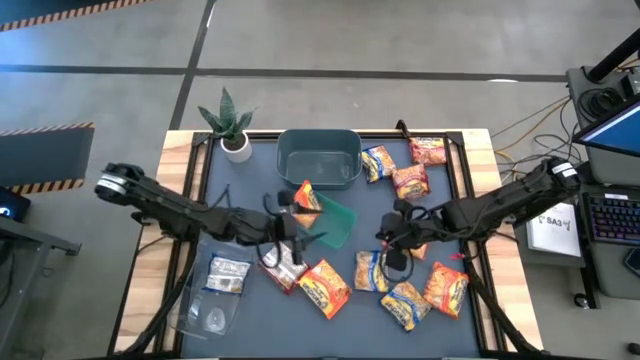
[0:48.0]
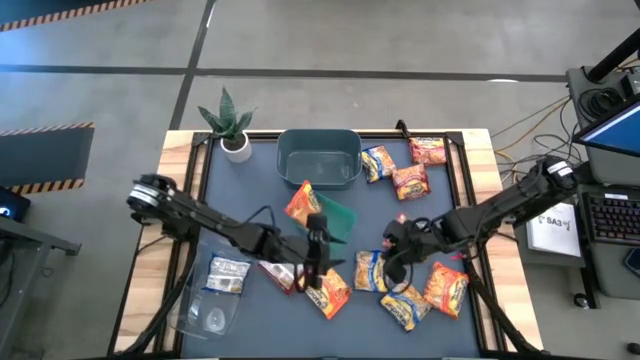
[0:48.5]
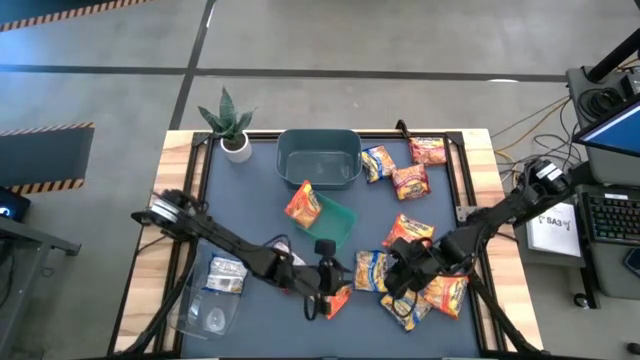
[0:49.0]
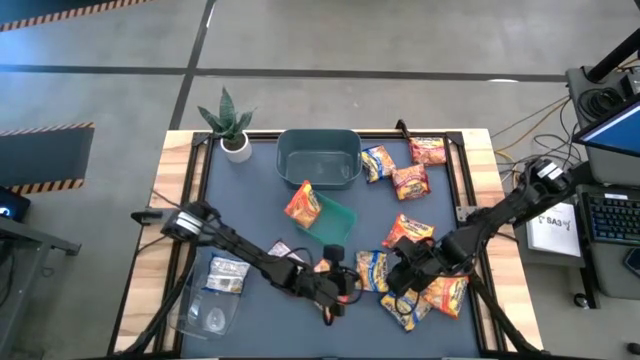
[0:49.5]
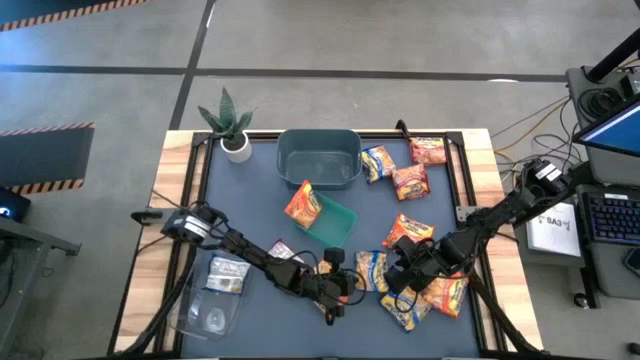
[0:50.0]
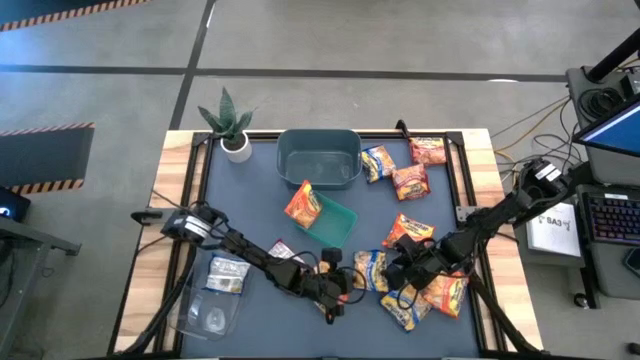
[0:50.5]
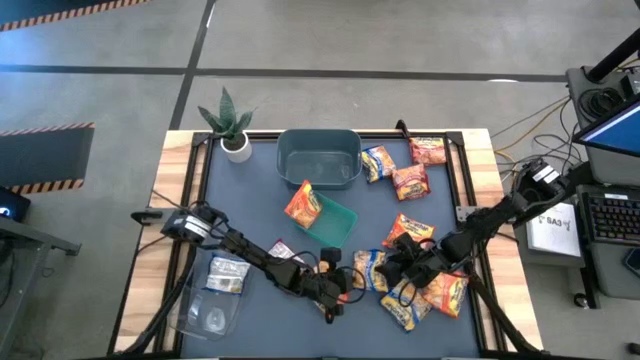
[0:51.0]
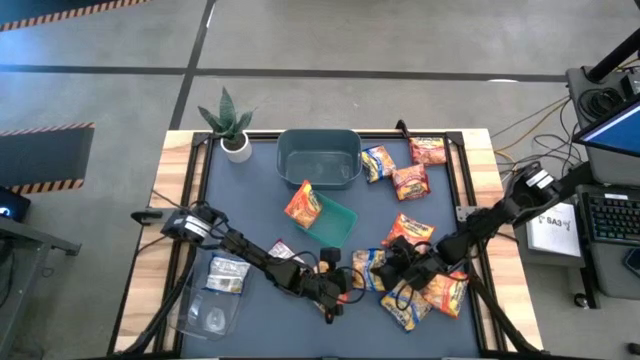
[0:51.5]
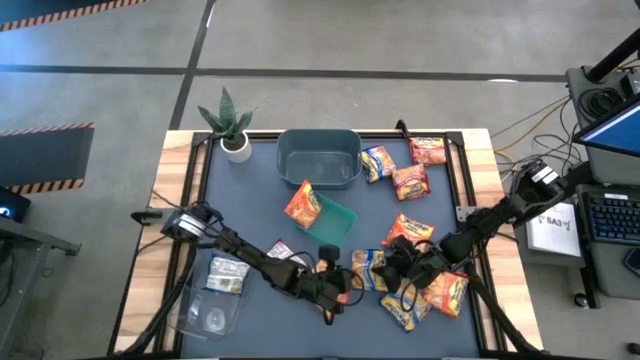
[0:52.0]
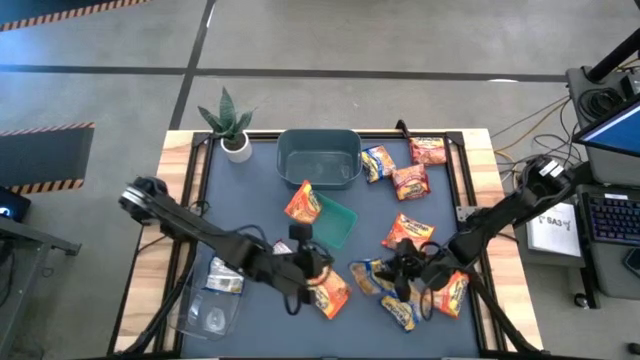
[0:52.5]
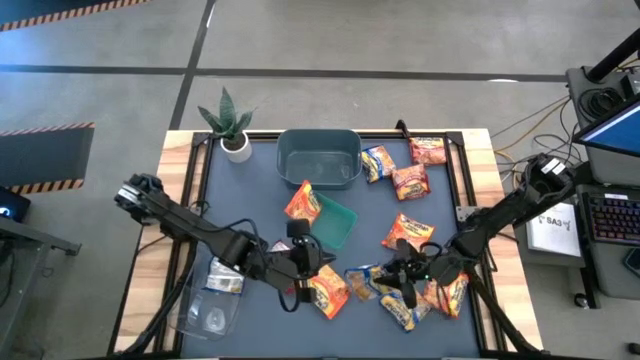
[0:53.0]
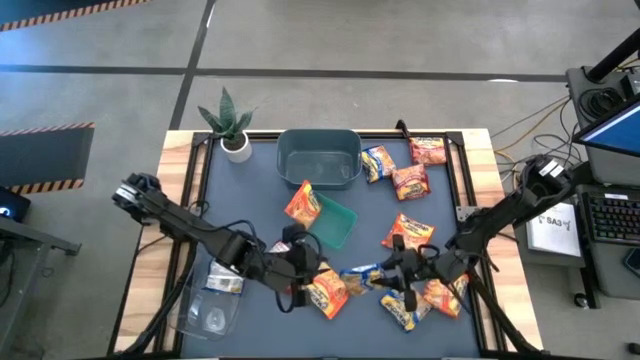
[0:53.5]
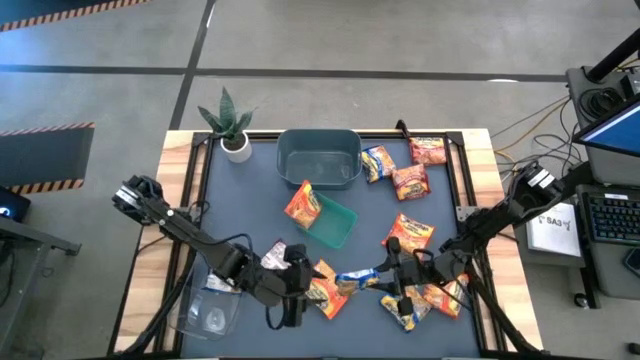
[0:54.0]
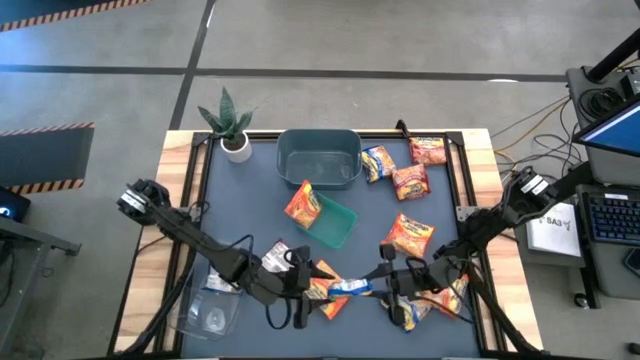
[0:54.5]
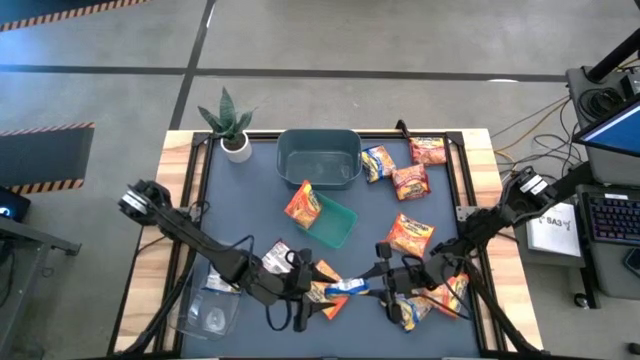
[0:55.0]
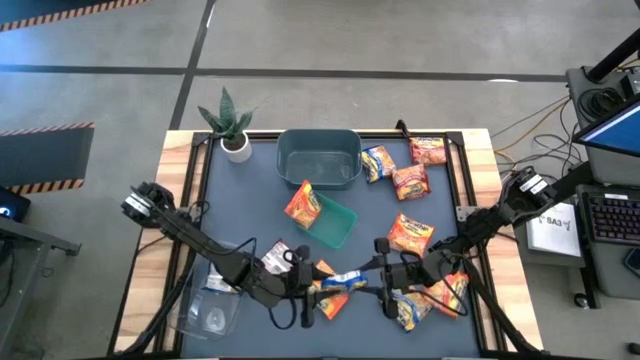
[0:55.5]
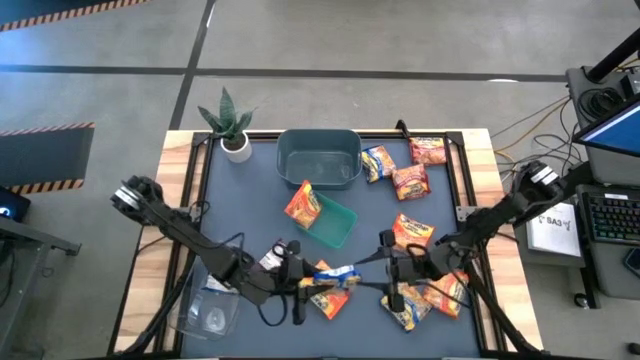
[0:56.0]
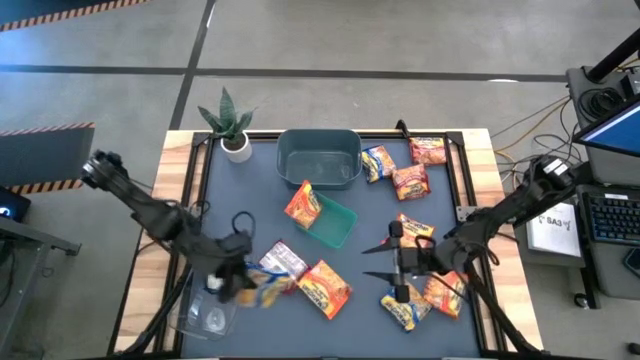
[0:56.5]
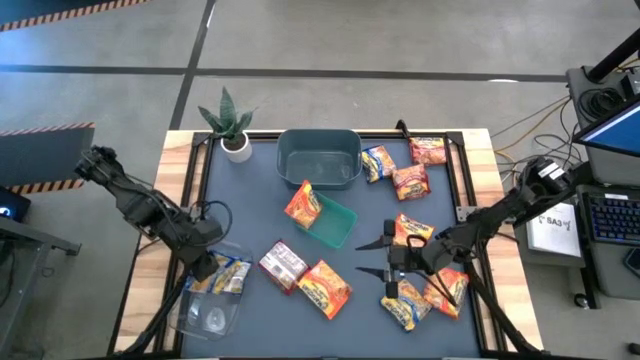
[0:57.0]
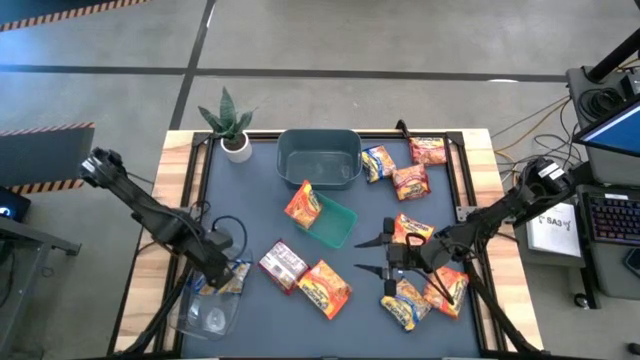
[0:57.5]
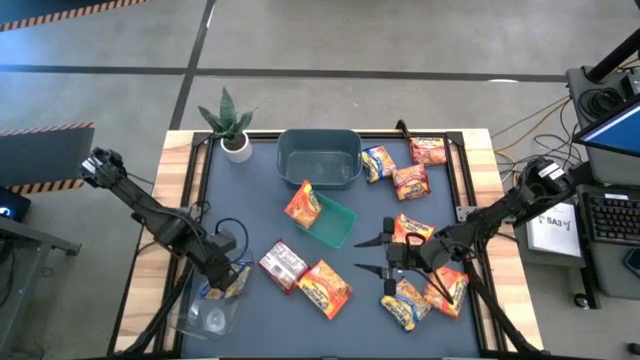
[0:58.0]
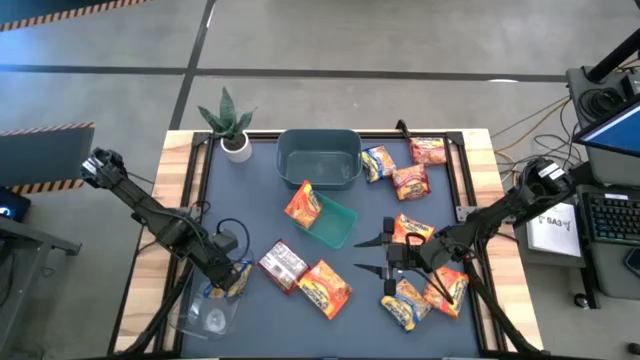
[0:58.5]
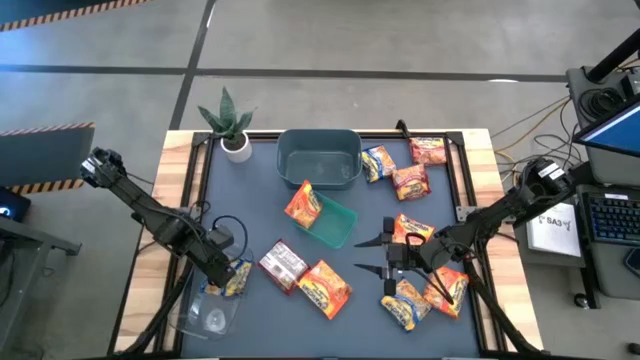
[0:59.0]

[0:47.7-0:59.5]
Task: Sort Maruchan noodles
Put the blue noodle pack into the transparent bin

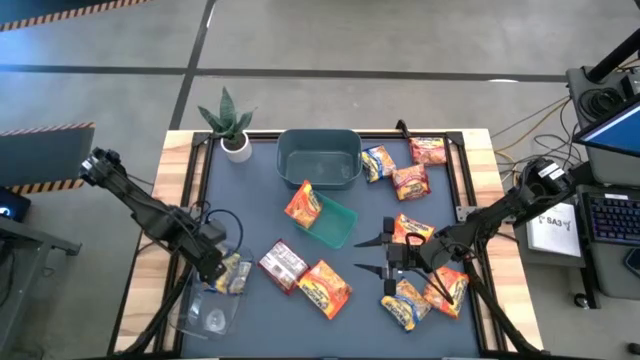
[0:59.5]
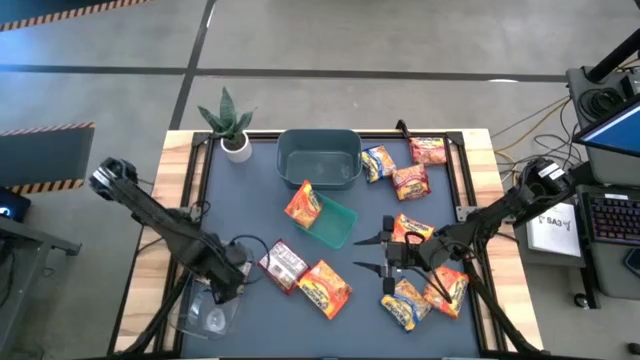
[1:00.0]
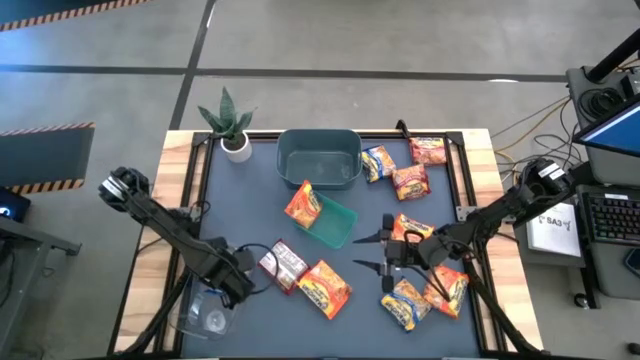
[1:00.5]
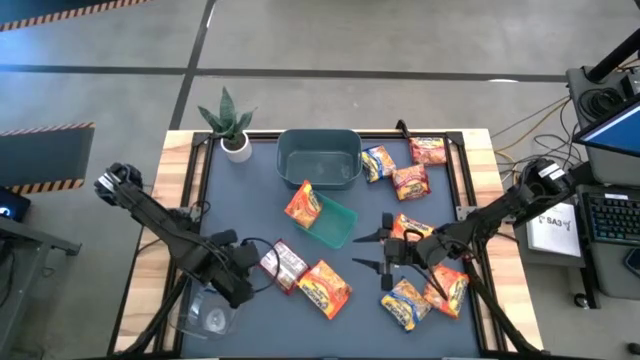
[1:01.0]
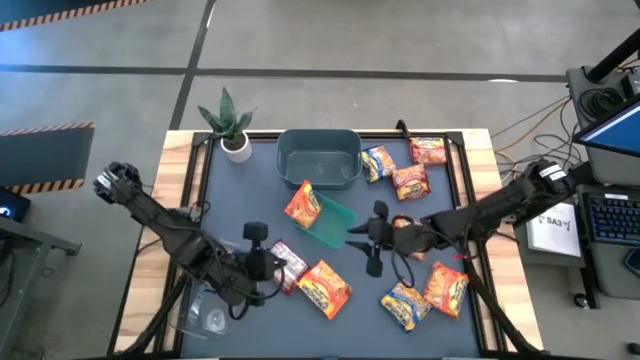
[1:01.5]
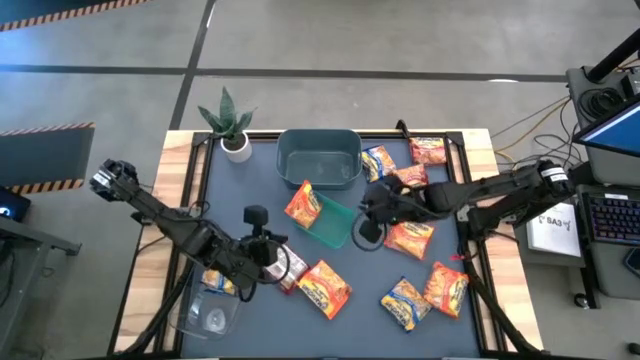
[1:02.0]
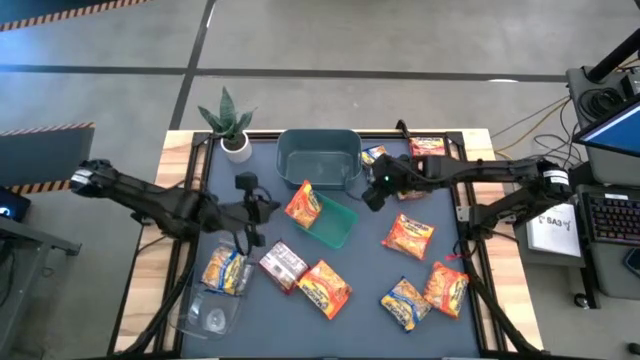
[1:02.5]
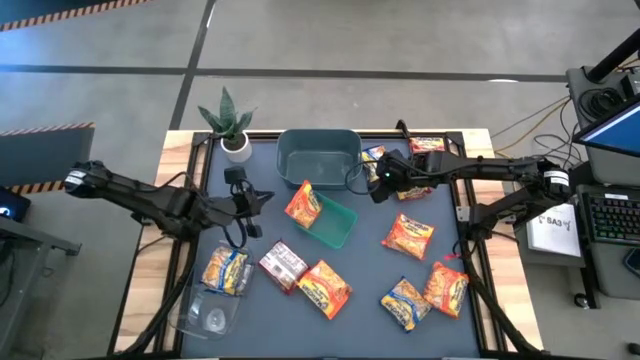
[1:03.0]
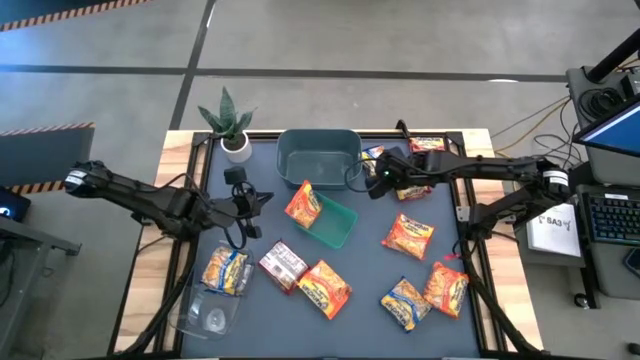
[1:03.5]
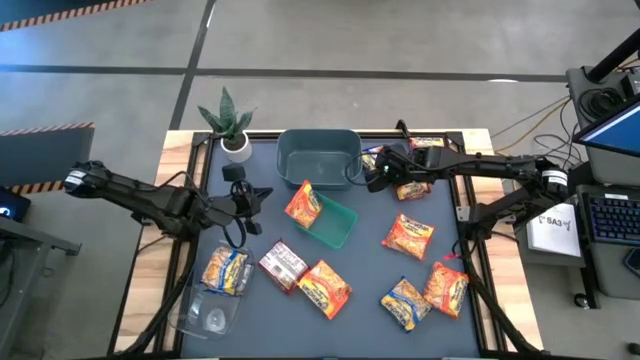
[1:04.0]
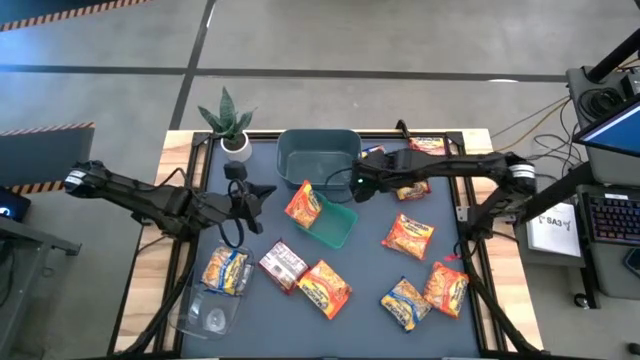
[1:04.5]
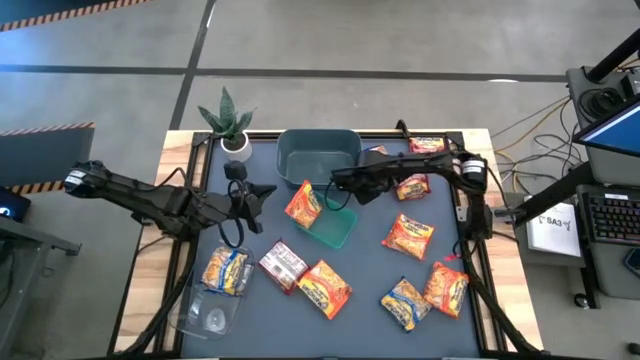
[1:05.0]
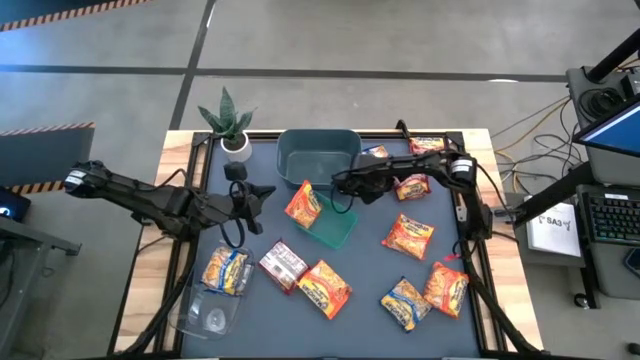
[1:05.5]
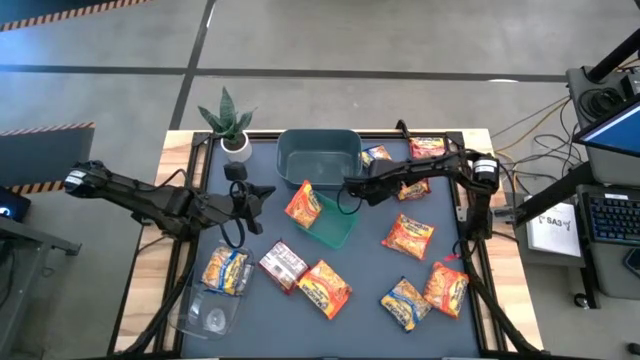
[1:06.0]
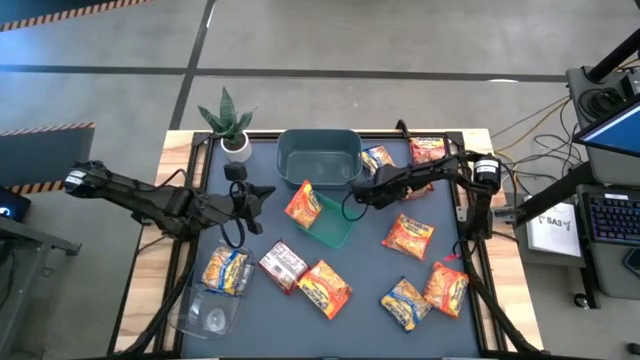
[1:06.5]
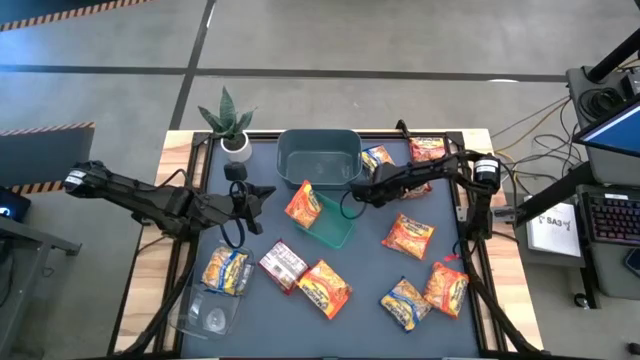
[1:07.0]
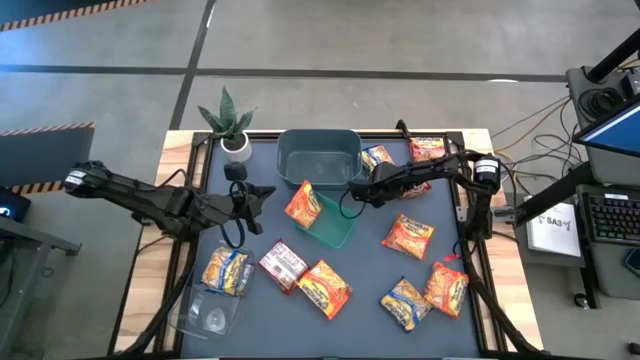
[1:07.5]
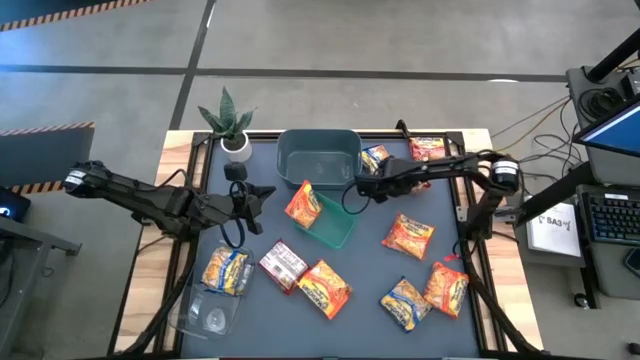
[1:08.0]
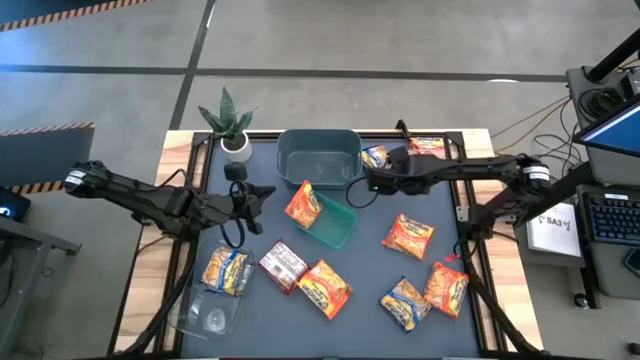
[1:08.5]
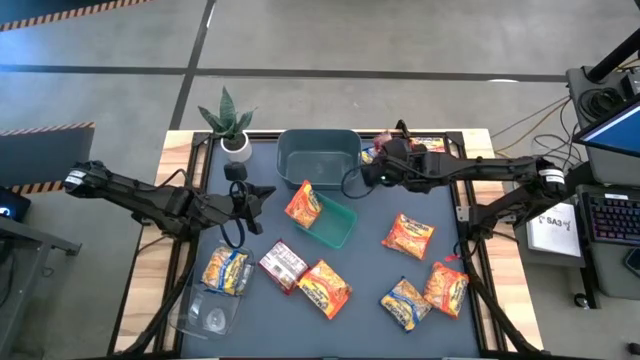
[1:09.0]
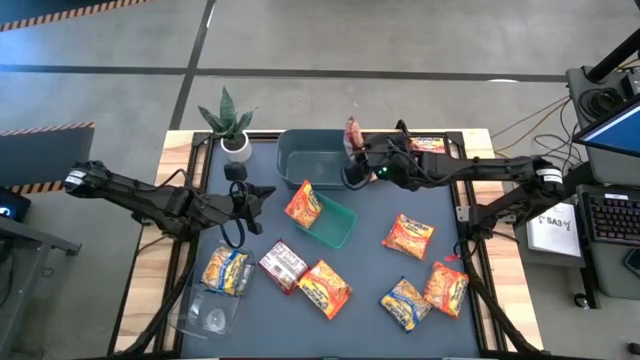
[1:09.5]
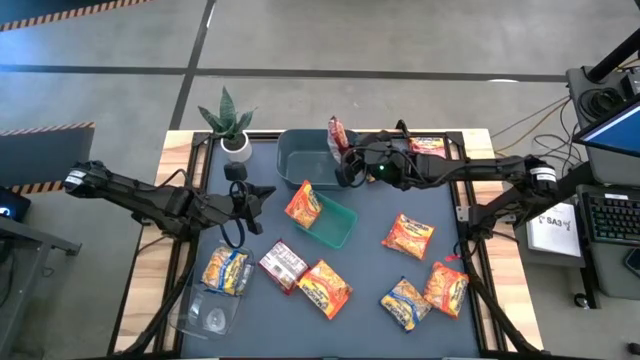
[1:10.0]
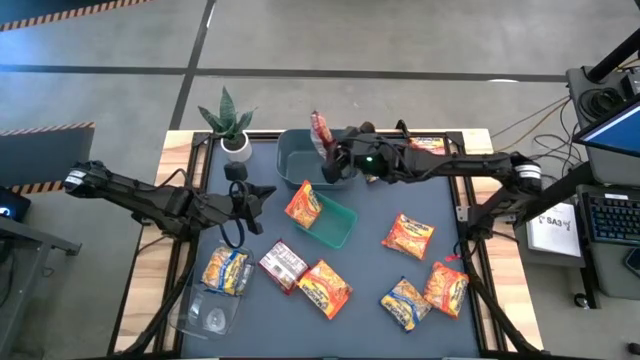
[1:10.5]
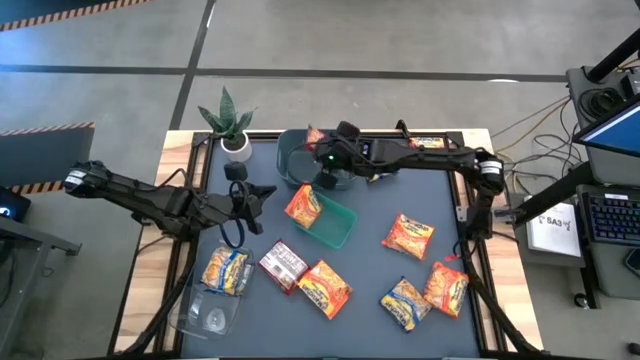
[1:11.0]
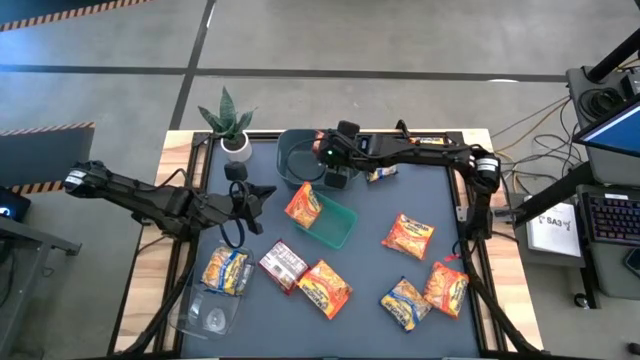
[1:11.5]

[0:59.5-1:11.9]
Put the red noodle pack into the blue bin
